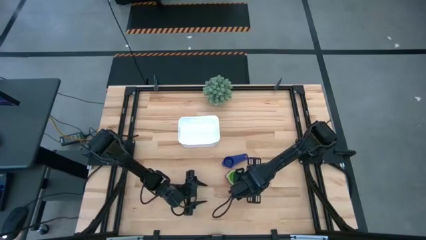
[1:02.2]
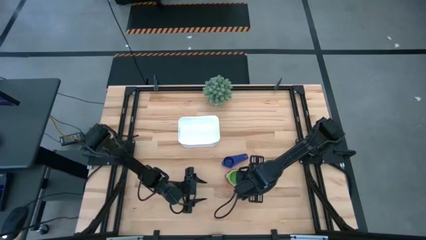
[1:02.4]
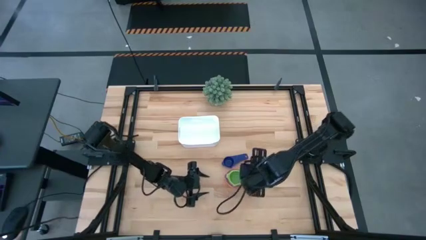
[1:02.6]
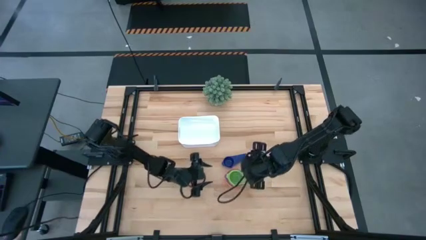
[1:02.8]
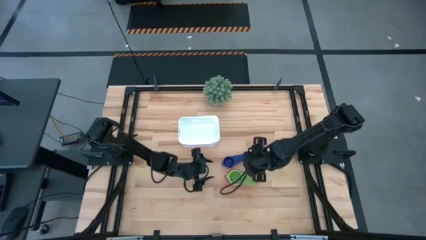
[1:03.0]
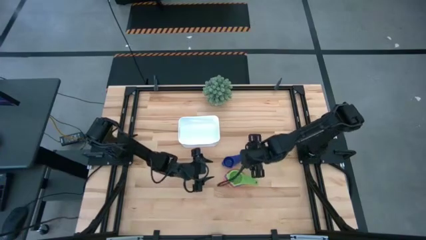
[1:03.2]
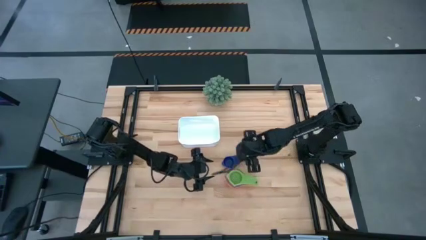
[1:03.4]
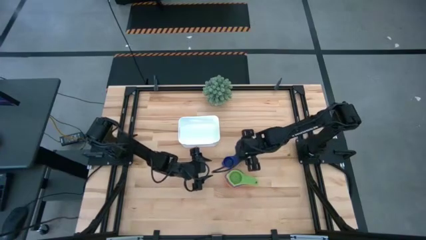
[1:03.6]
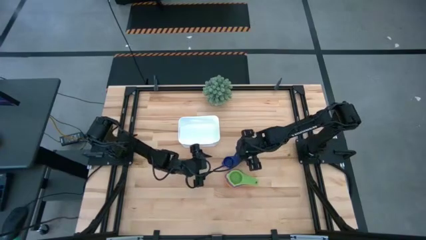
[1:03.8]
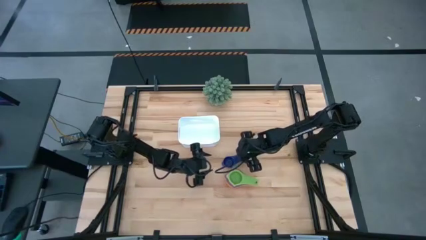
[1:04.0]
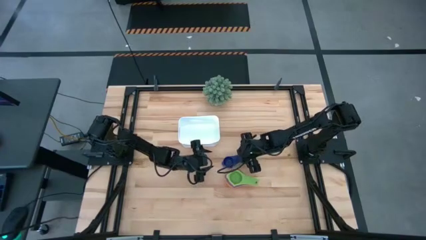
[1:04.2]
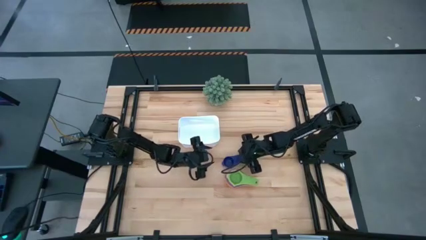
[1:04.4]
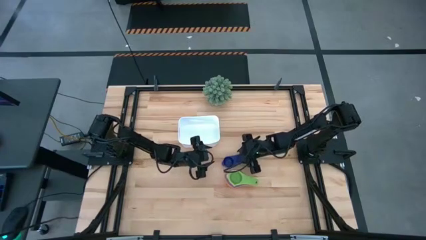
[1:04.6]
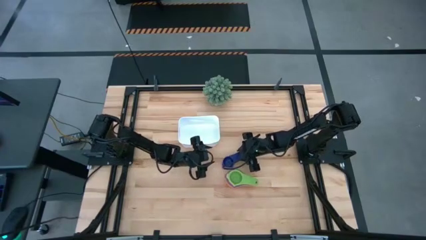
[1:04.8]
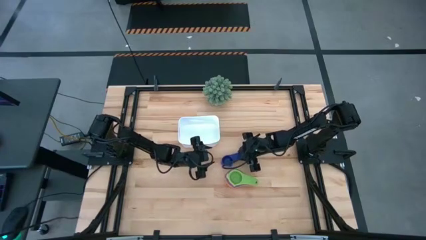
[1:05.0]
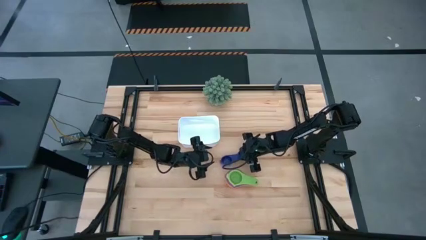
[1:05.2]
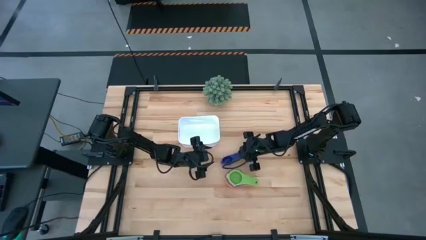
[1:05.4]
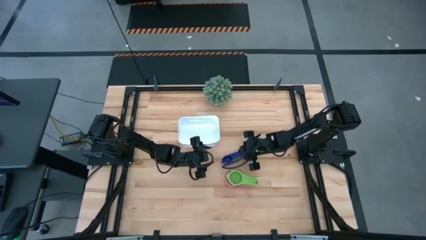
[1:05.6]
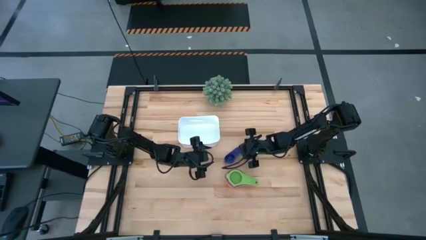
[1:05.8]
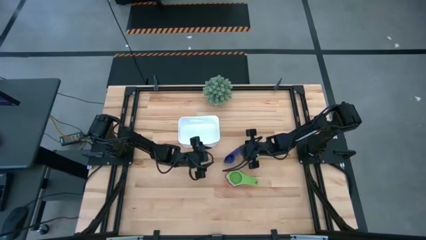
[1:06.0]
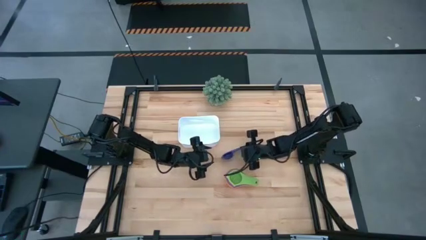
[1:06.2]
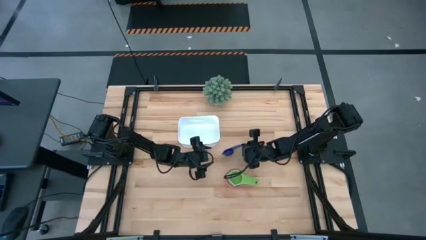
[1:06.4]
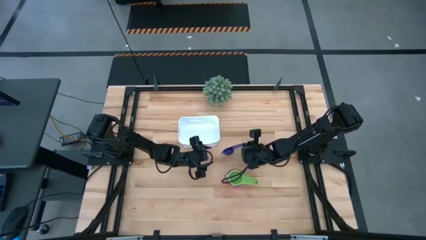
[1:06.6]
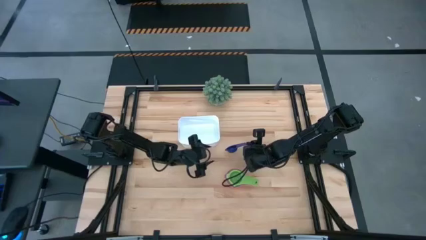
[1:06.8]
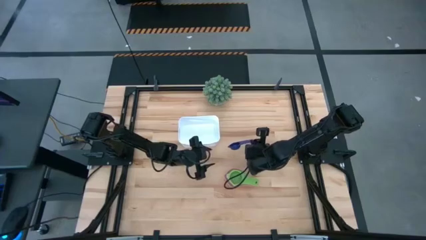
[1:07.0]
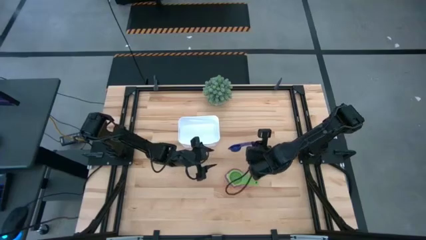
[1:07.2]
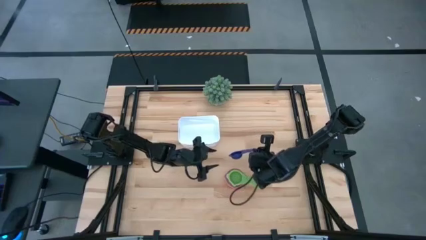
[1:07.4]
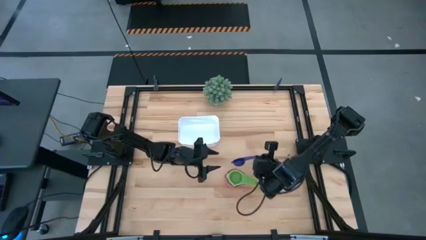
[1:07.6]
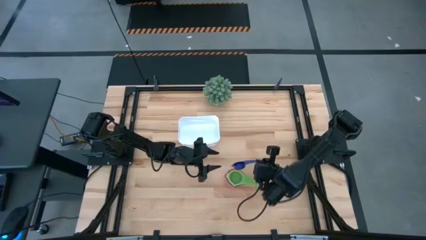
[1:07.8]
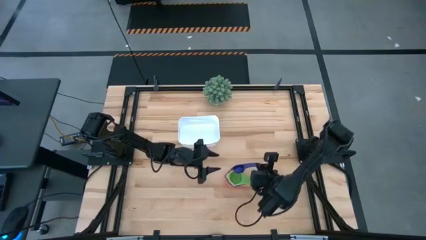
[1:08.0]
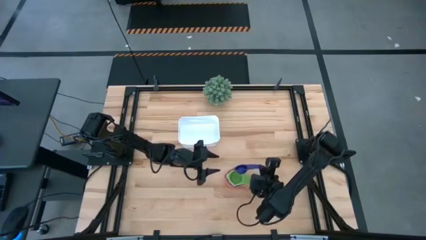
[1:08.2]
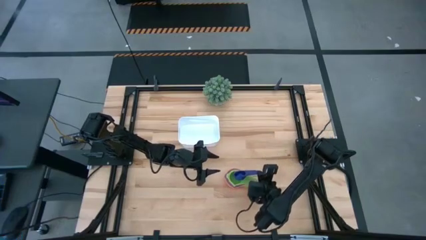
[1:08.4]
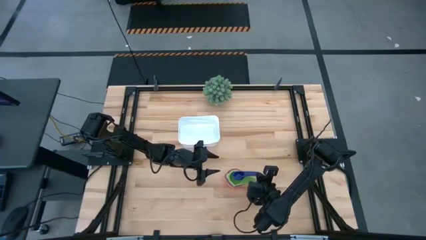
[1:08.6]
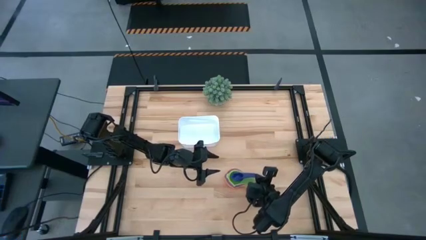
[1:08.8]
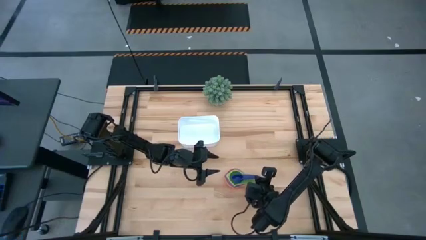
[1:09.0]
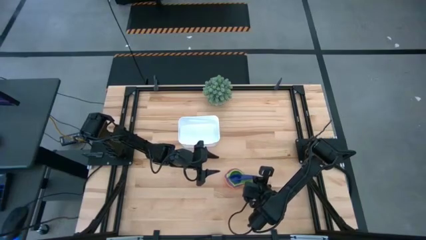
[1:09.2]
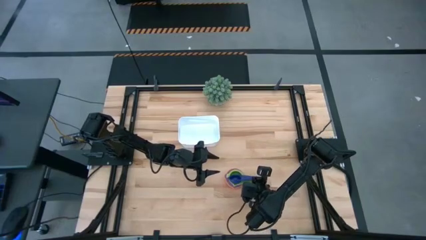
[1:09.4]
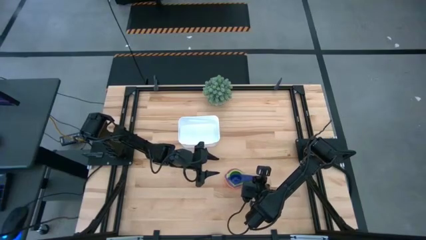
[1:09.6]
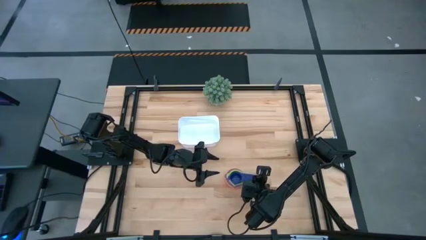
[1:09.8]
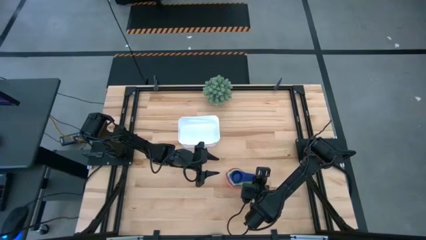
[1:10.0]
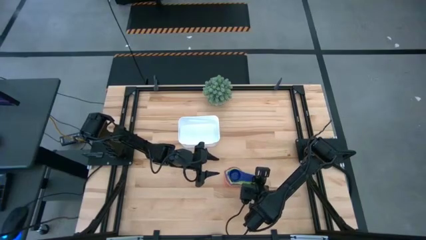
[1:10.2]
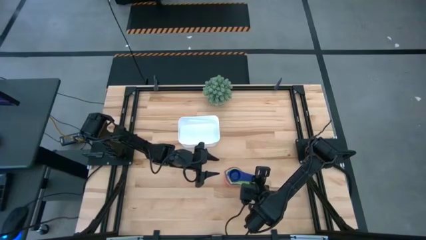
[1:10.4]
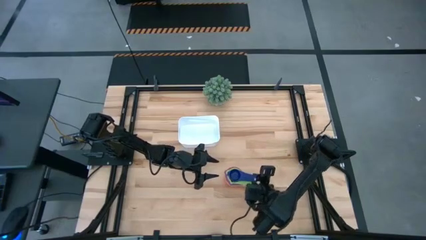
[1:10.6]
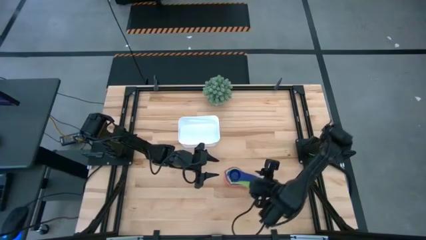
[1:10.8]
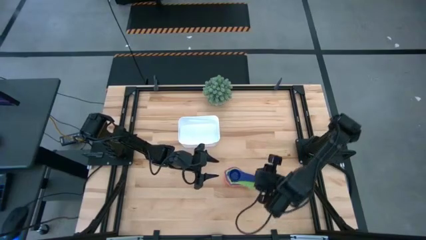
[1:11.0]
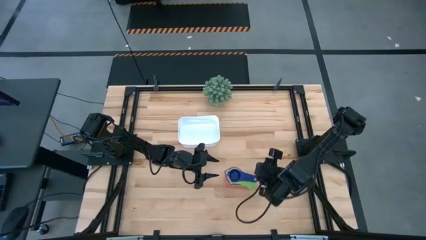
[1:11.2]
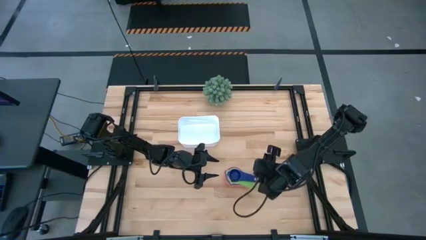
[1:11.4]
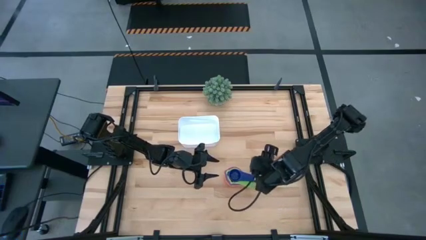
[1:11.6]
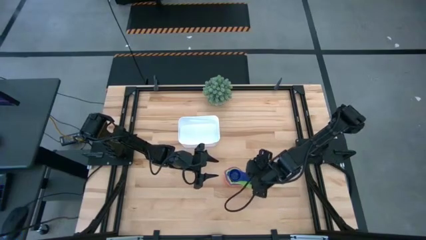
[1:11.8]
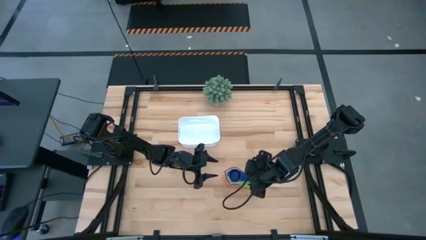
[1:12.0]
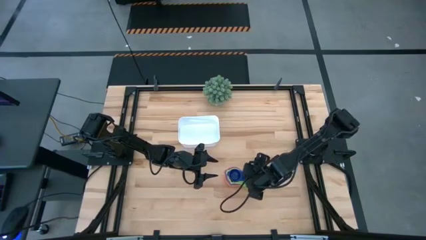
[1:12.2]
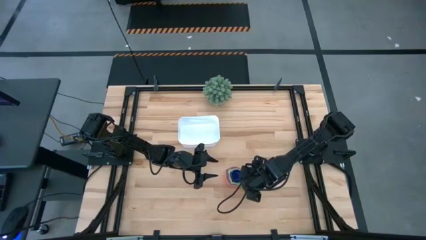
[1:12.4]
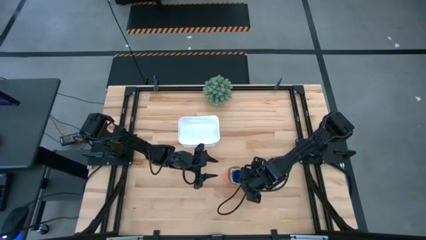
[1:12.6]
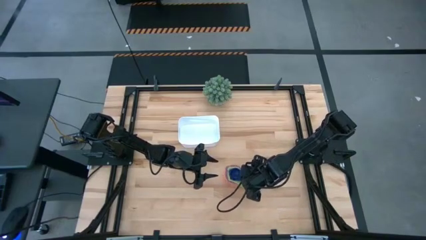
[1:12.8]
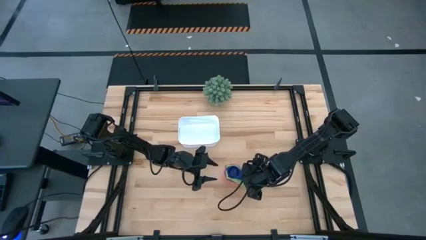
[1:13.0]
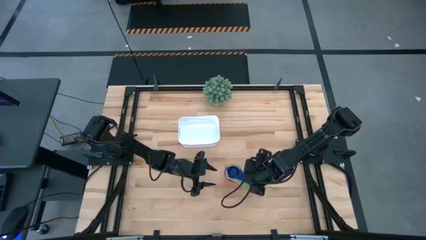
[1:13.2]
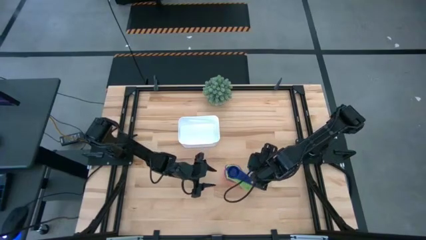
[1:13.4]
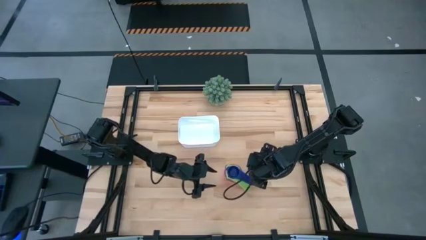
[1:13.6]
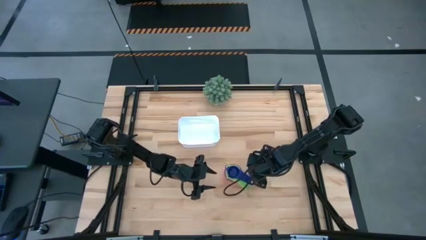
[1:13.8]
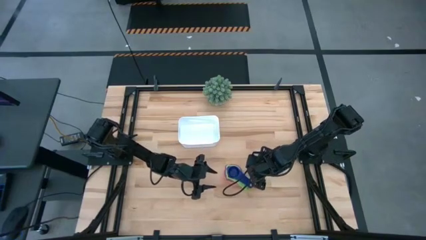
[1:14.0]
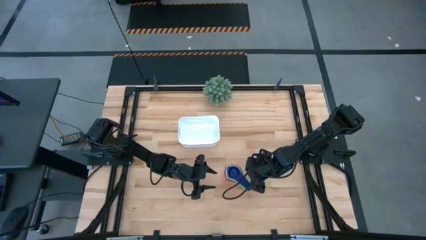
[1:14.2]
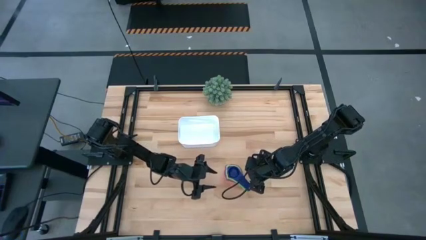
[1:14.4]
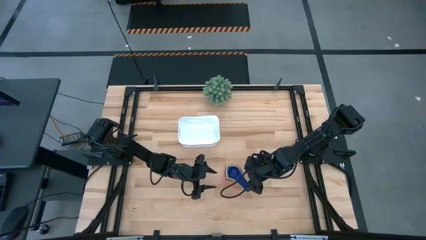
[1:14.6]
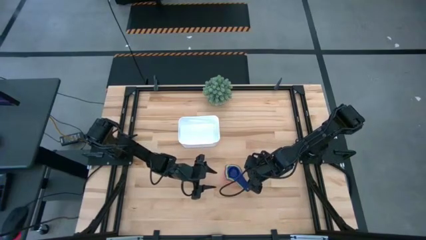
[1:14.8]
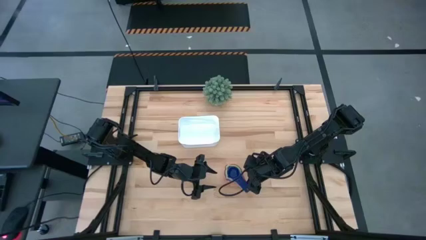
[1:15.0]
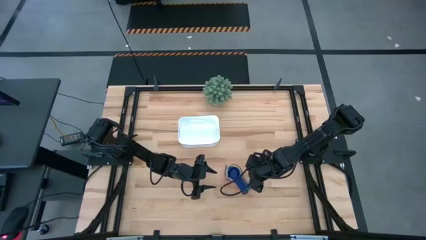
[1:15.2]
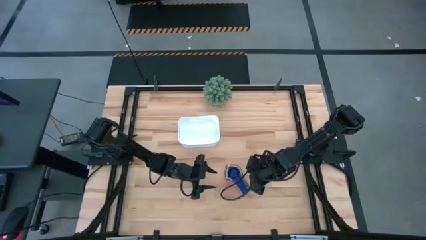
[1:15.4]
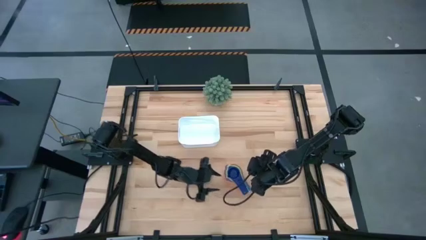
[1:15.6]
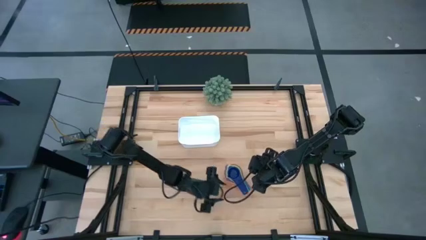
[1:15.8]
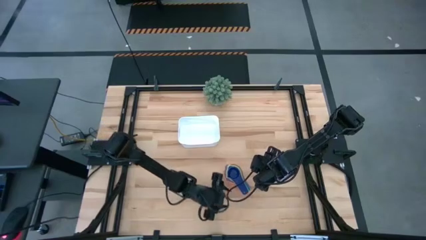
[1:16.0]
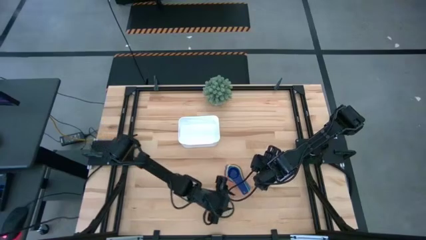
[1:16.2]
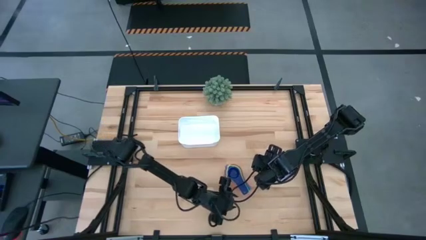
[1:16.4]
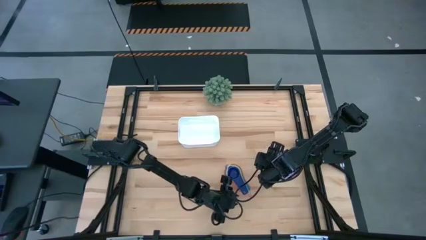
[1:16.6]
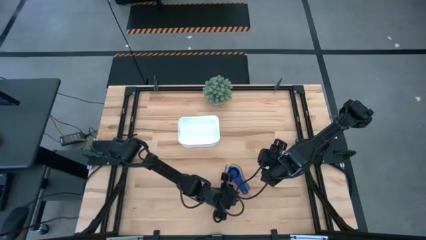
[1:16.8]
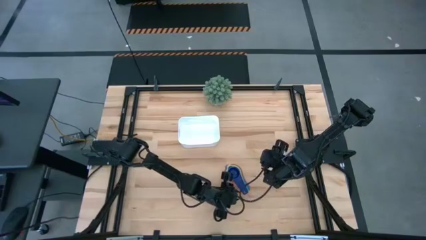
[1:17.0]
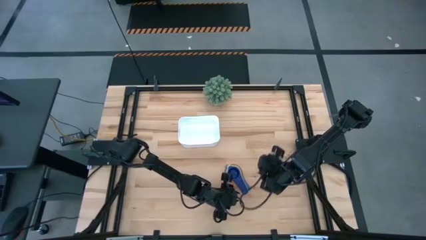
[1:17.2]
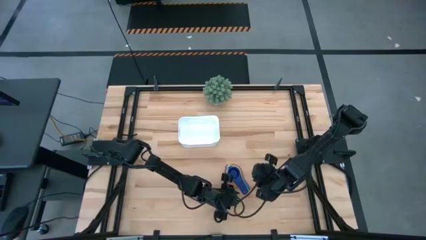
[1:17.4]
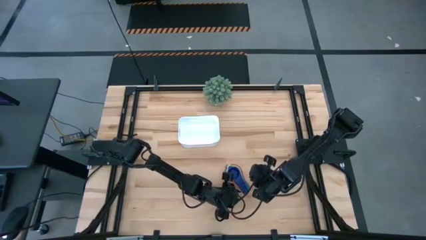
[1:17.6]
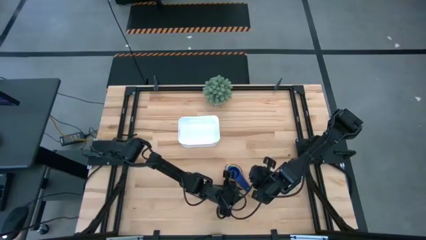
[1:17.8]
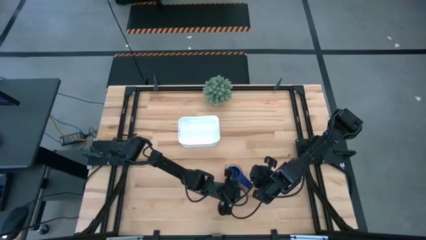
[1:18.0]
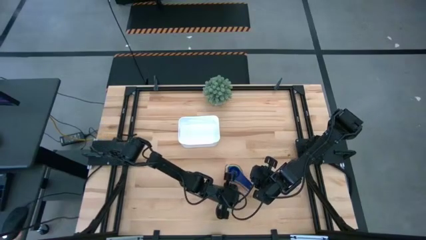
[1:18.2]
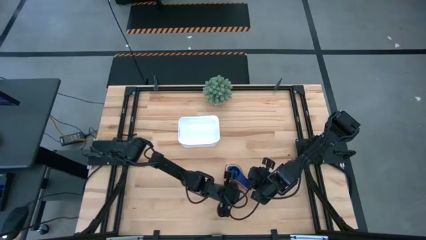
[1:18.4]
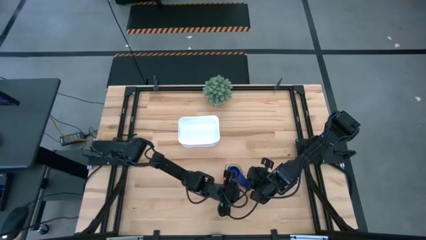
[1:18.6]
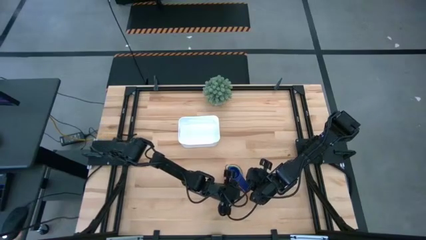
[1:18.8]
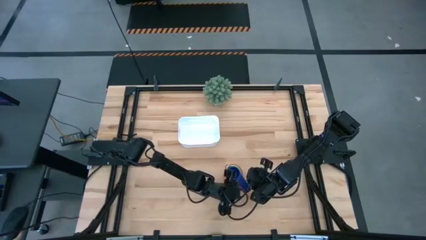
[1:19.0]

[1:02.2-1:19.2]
Task: Nest measuring cups in basket
Stack the small blue measuring cup on the top of the green measuring cup
